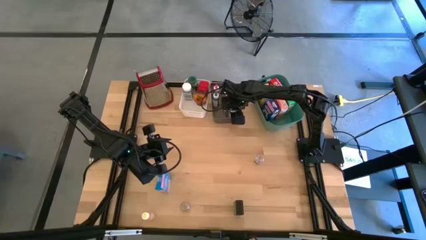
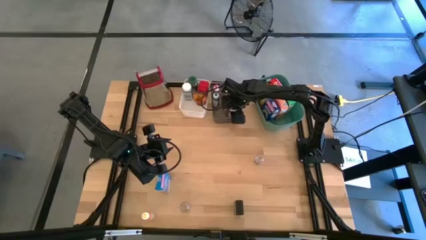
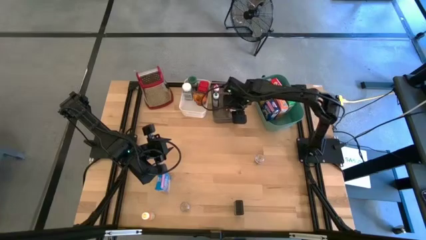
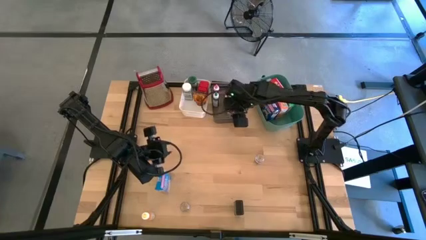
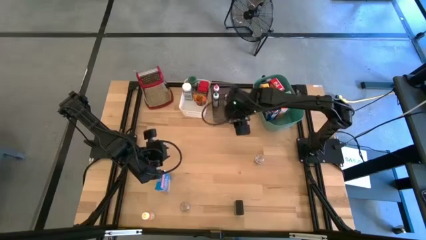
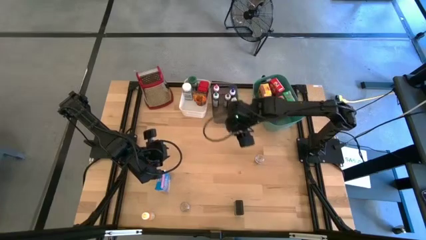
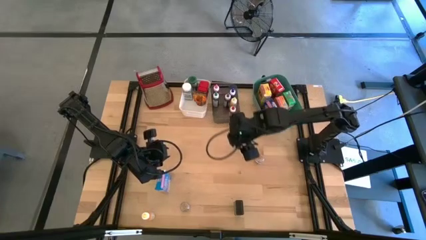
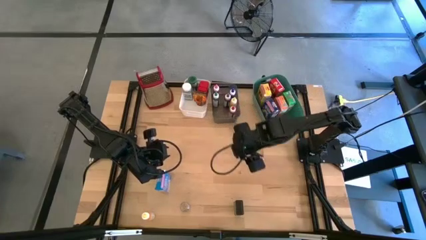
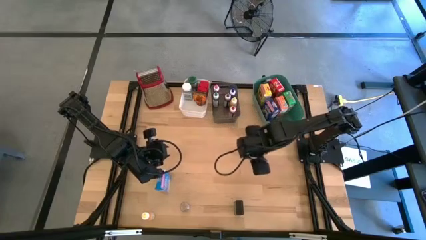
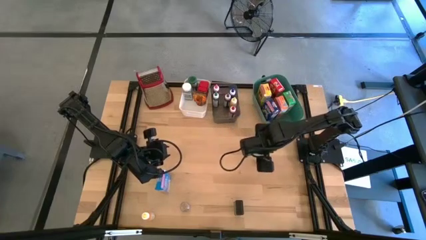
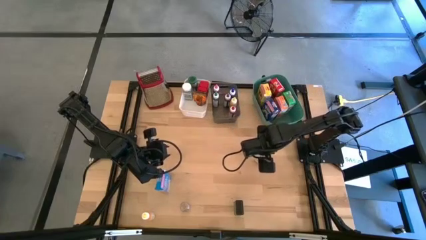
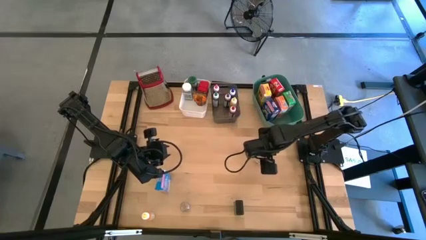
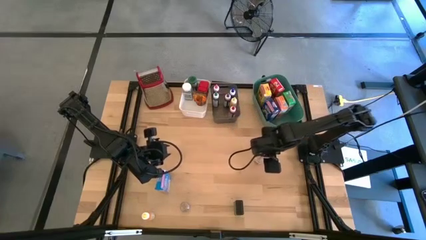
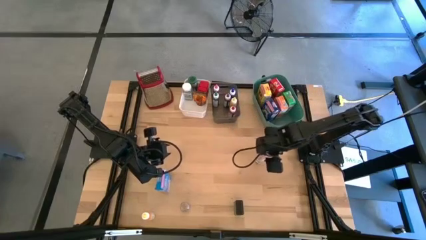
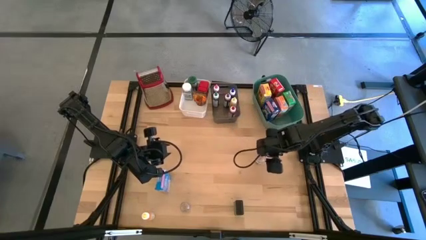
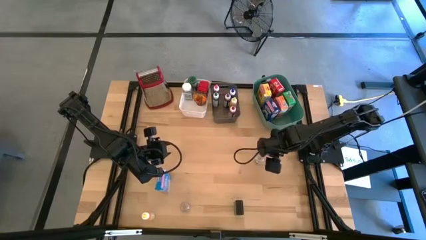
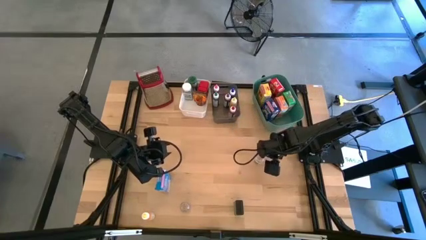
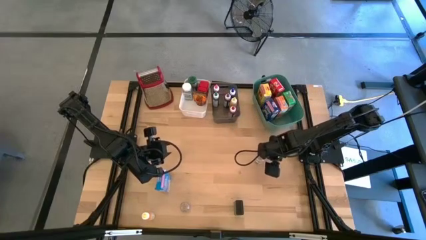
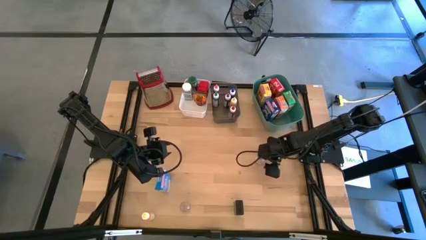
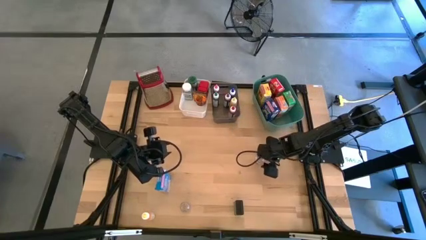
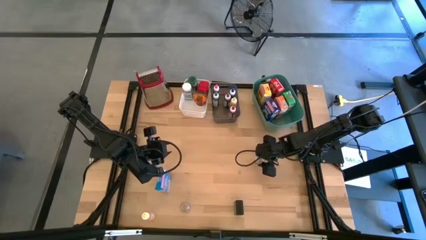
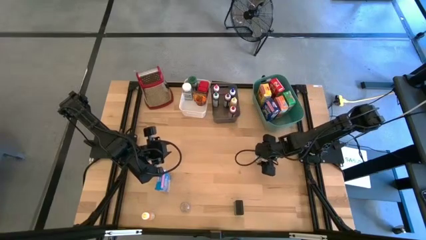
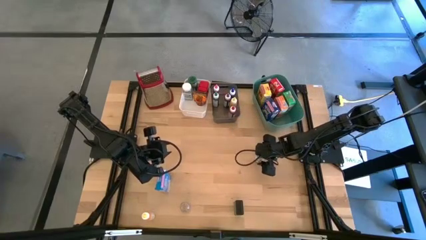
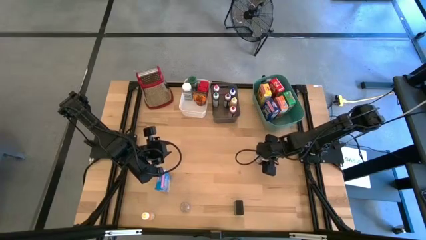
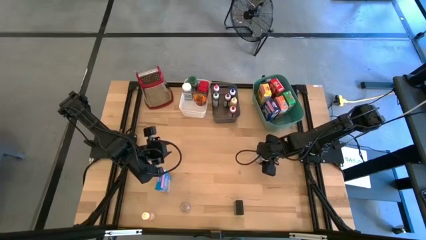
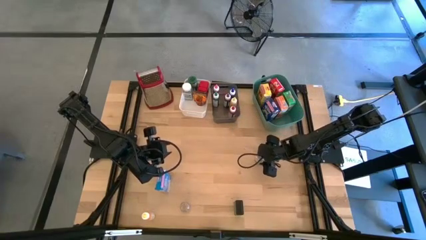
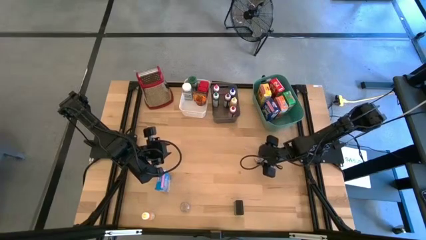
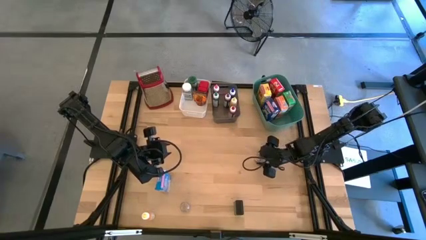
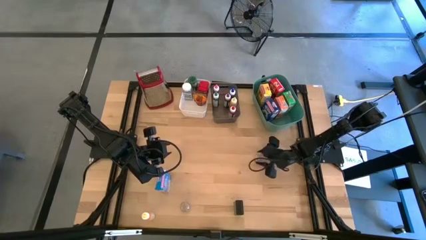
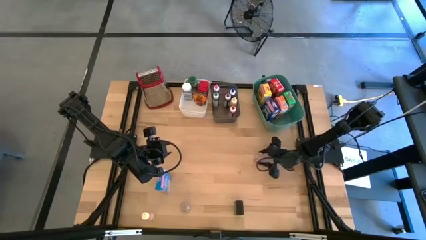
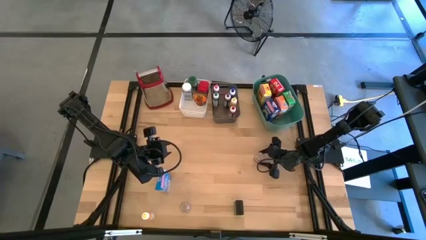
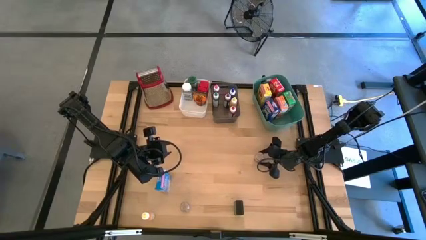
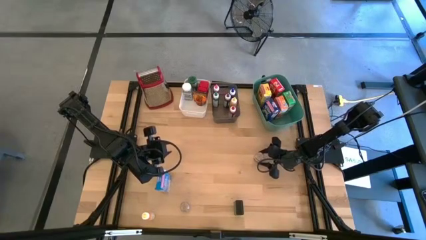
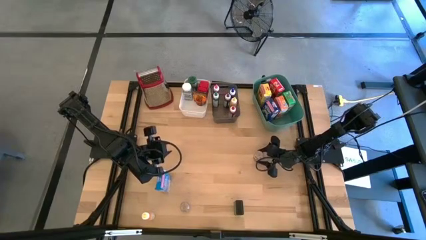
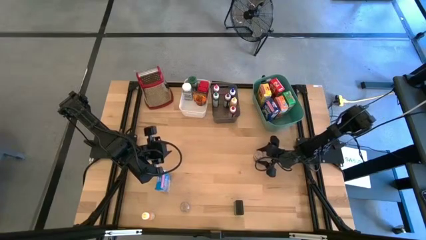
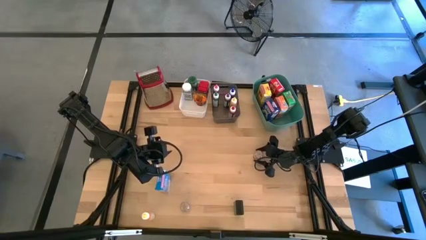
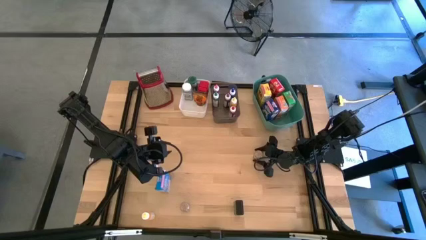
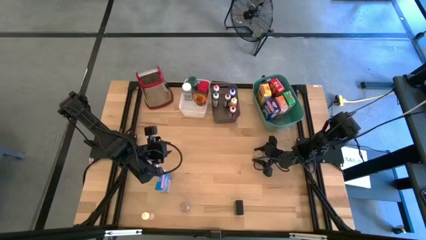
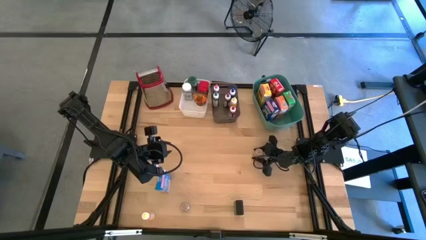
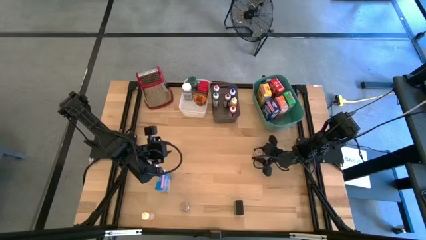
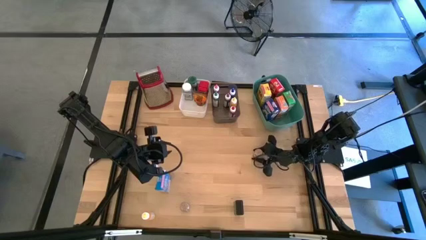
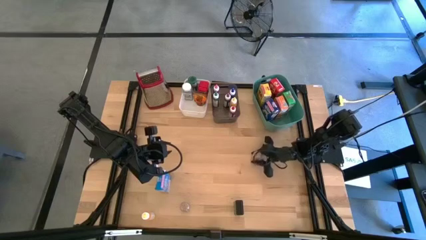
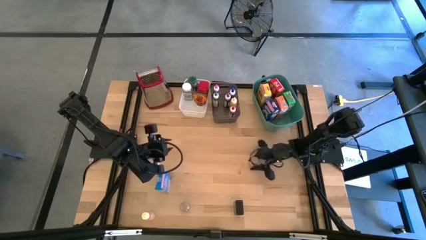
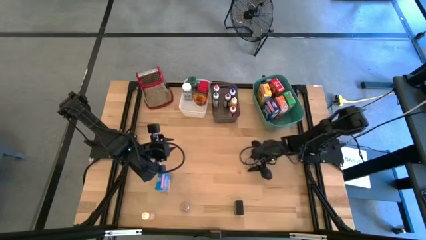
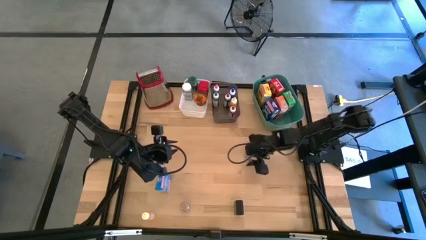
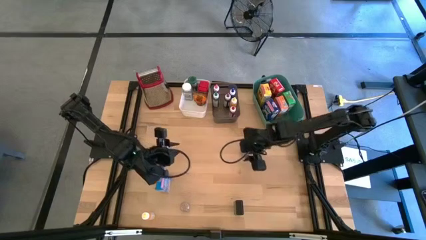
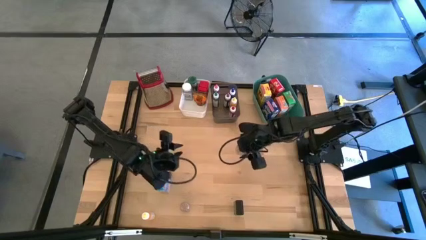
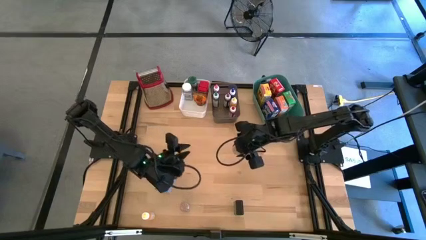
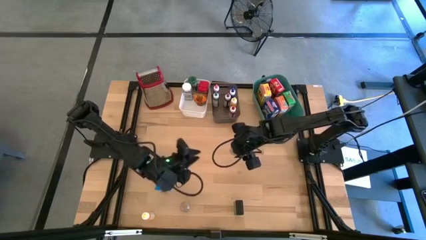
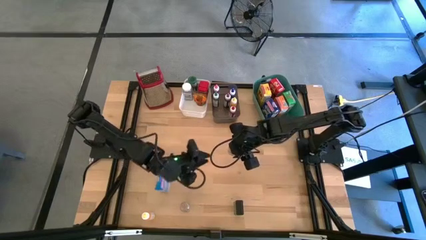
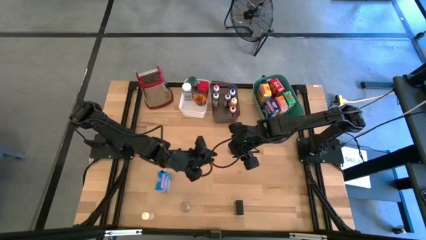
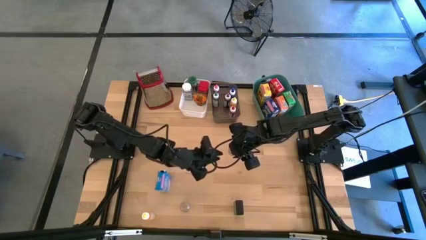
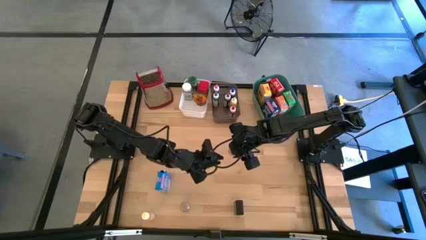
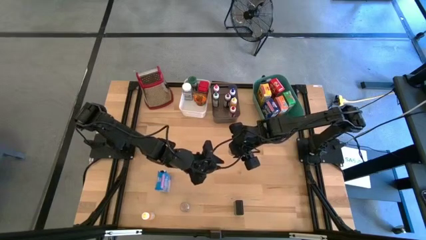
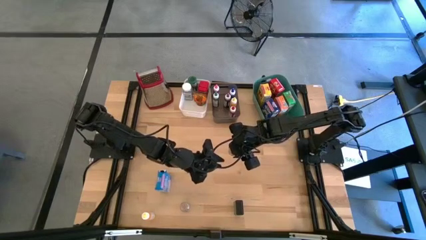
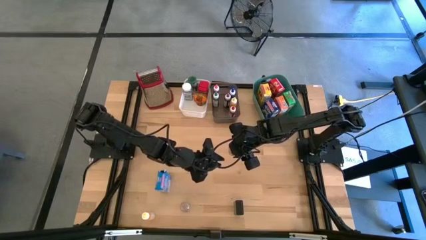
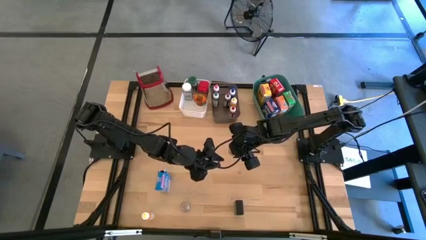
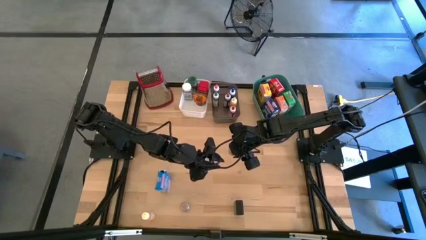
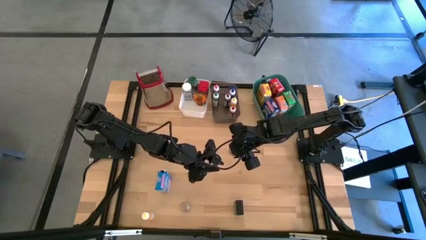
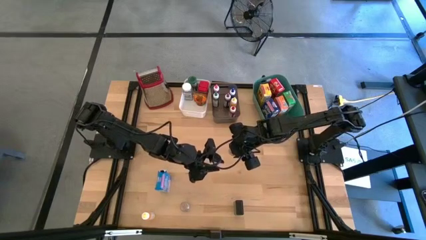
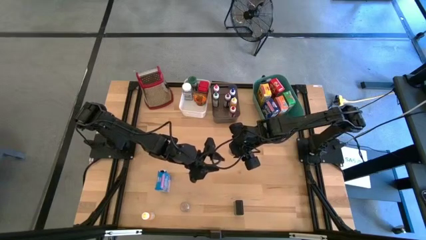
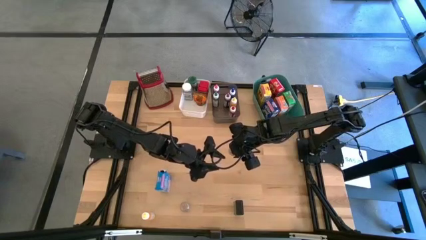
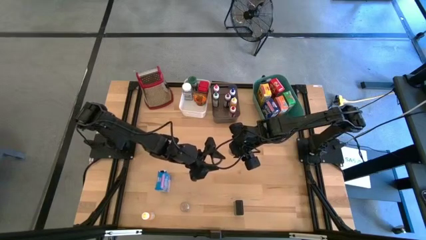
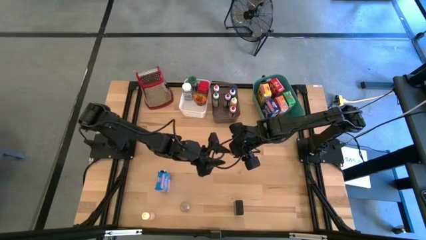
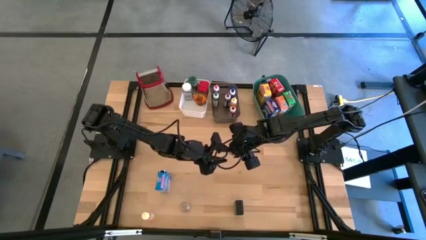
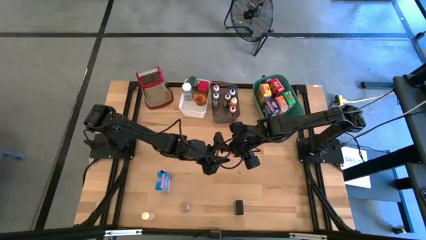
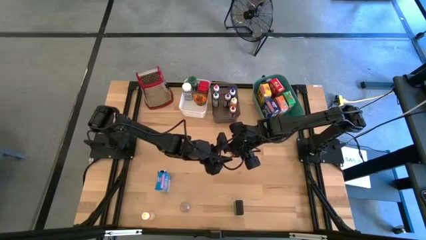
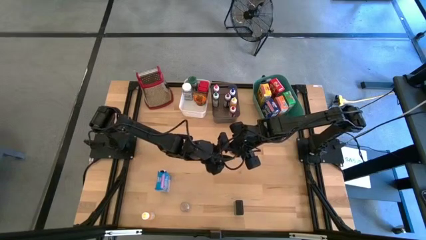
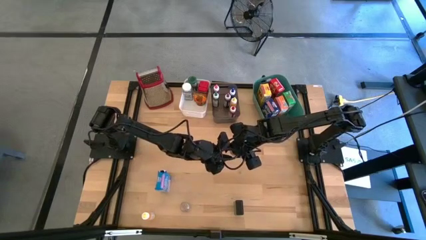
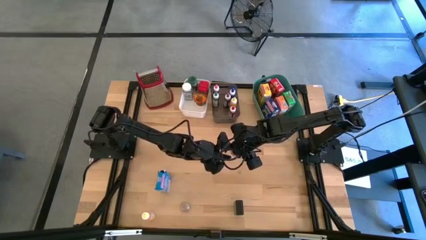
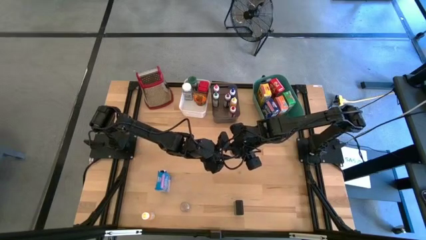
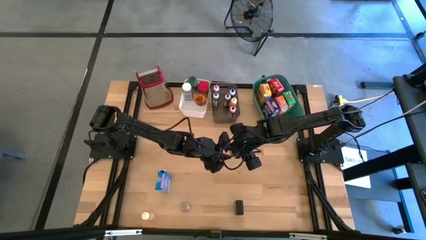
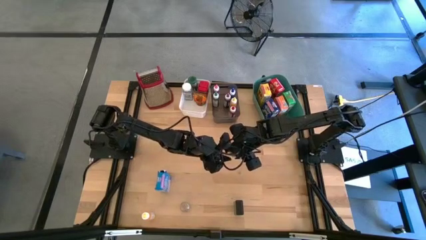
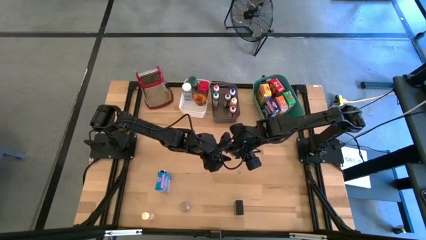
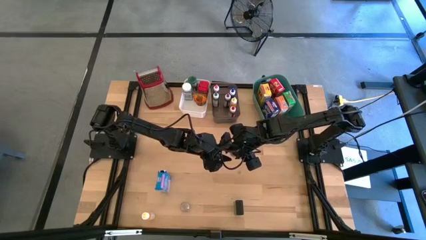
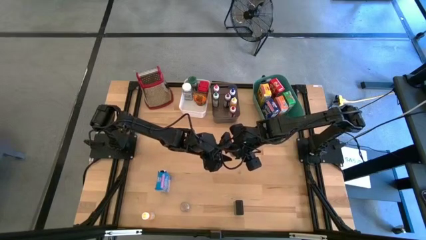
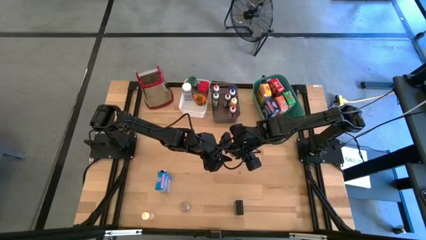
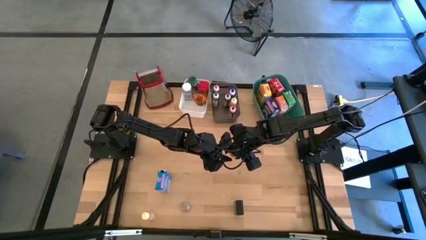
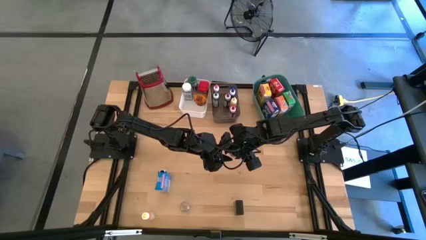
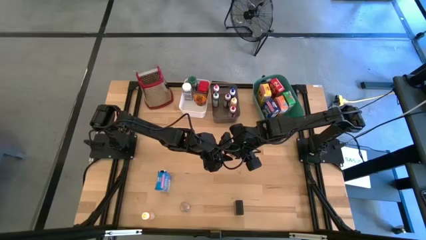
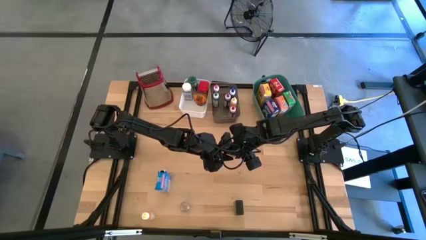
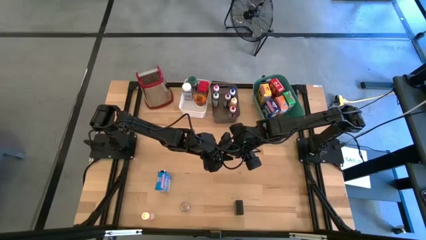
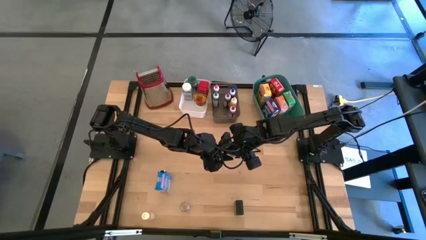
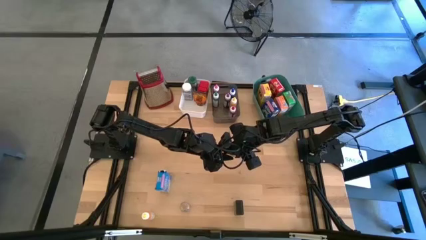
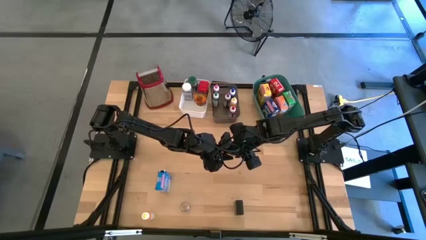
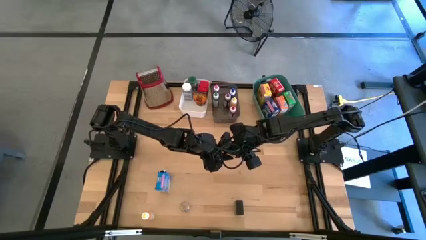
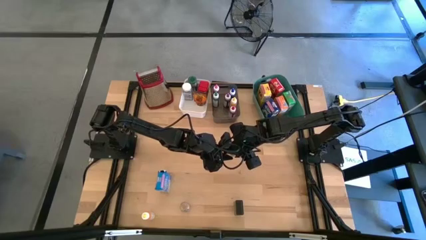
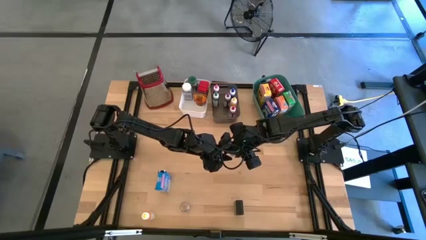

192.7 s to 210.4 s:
Task: Pick & Place Kitchen Items
Put the top brown seasoning bottle into the white bin
